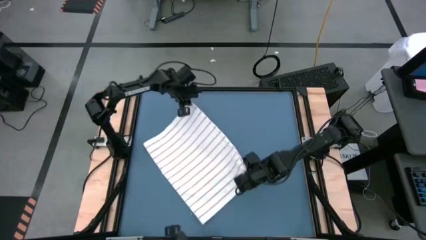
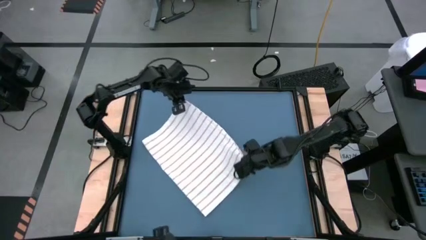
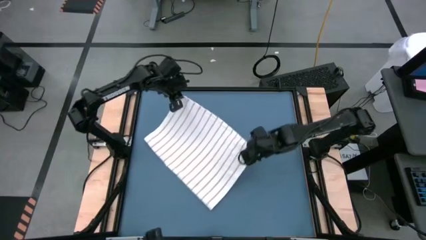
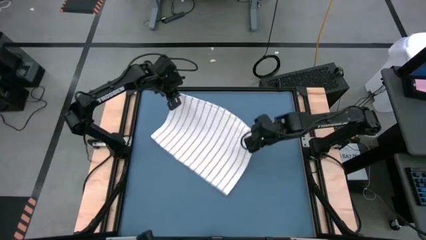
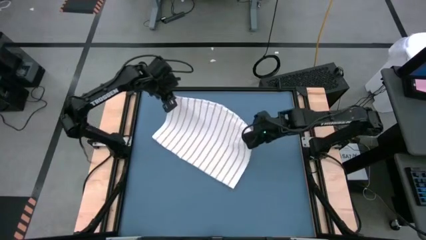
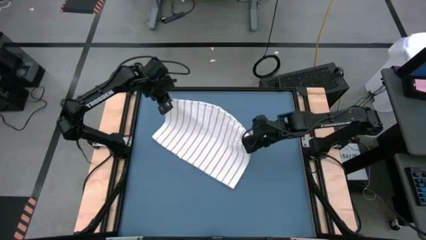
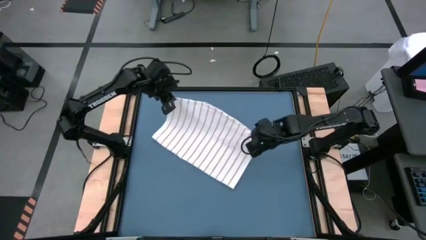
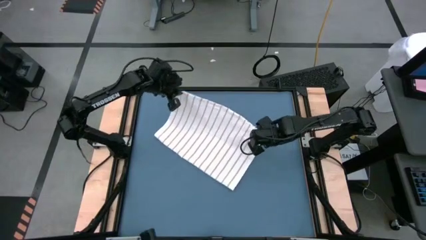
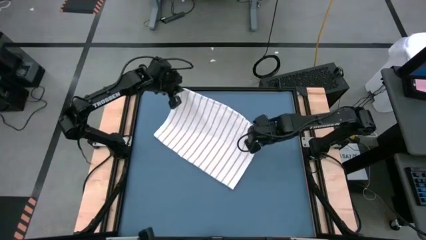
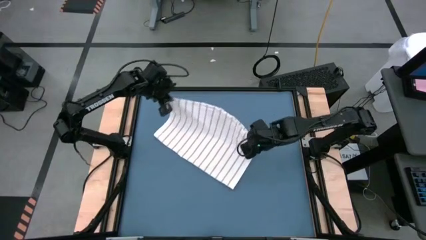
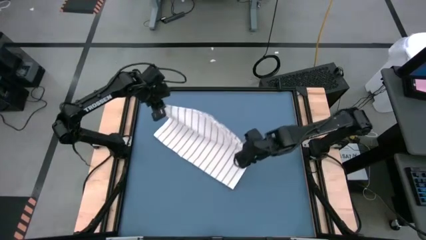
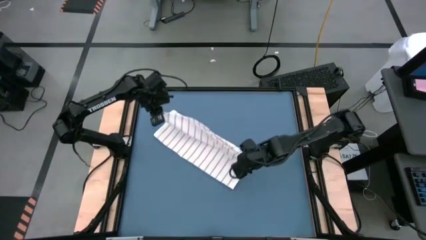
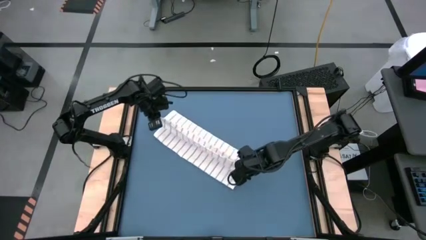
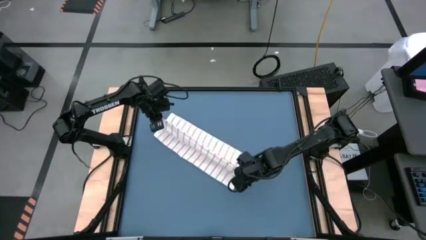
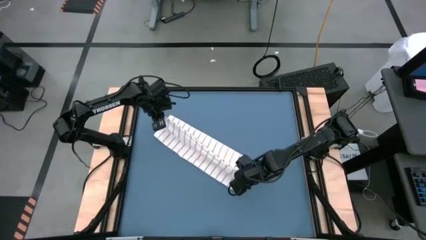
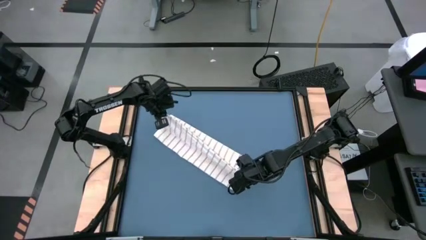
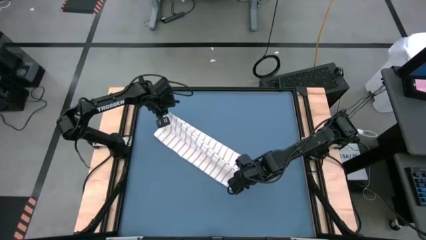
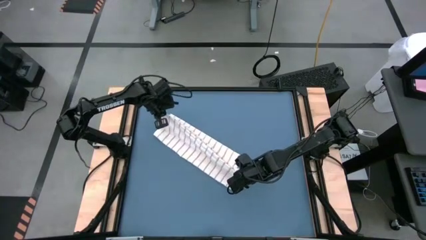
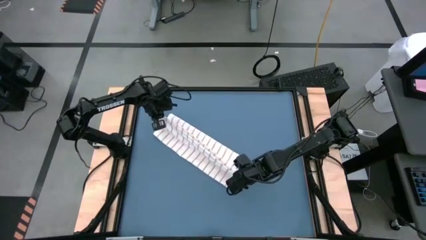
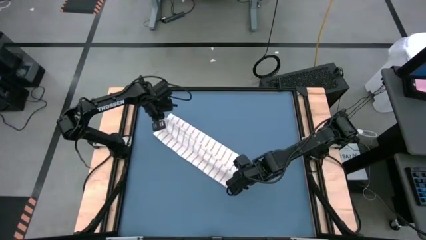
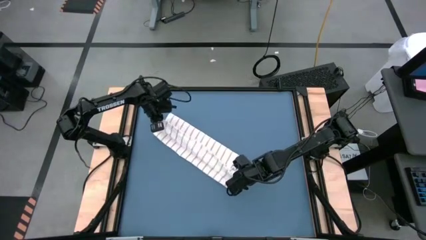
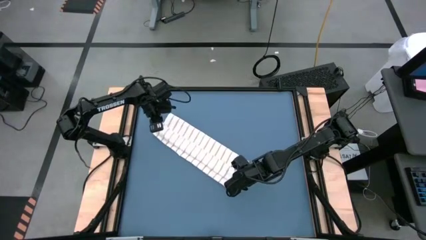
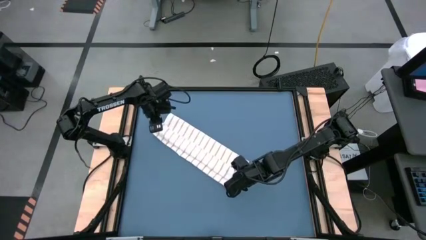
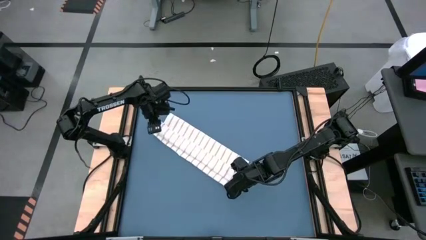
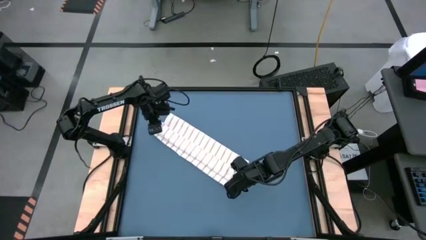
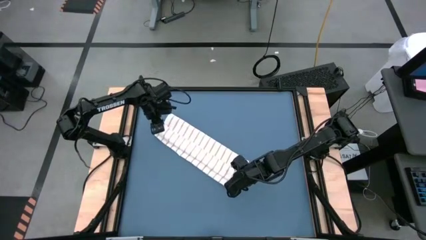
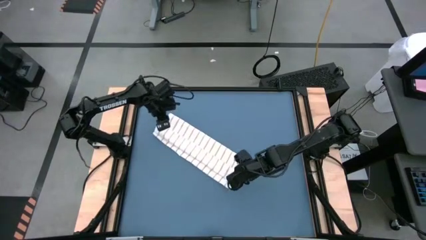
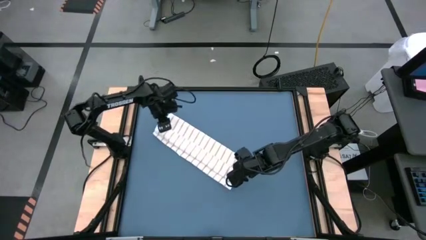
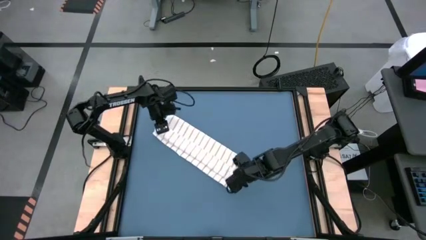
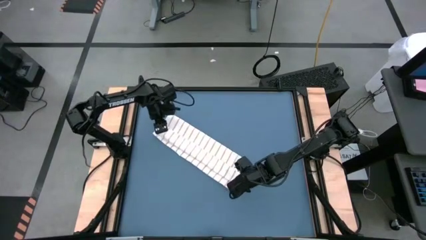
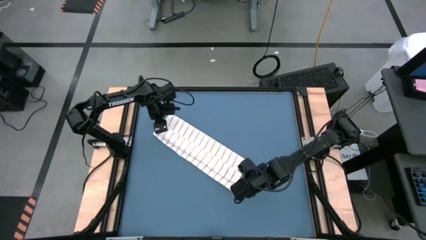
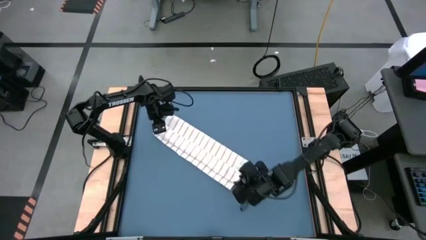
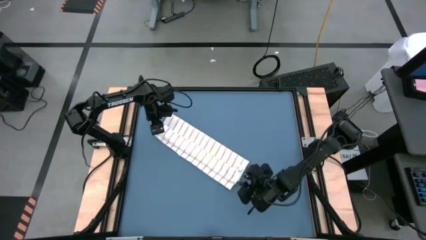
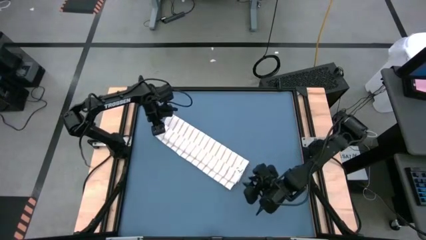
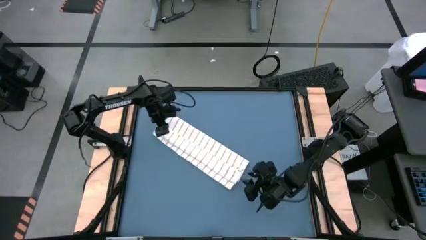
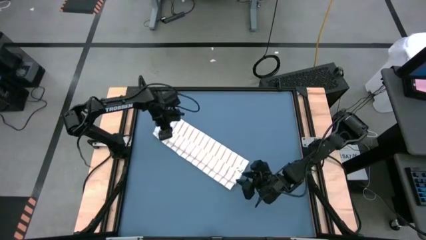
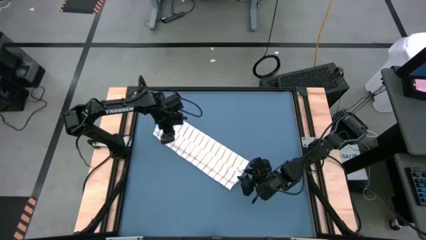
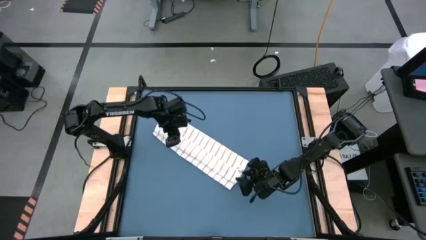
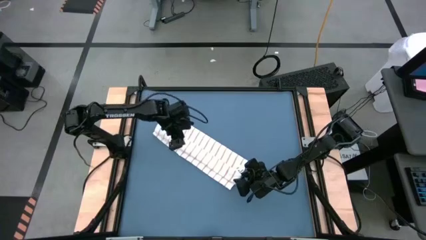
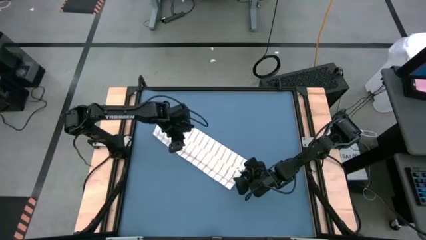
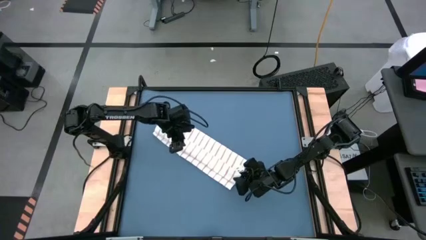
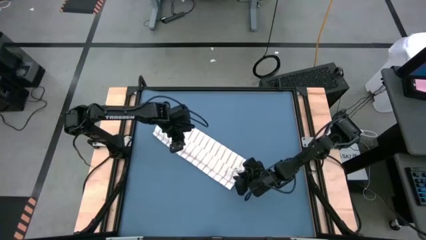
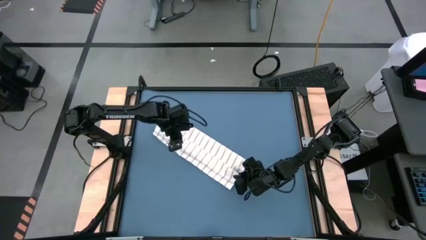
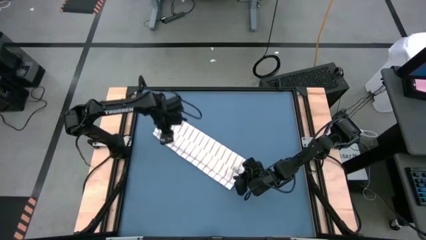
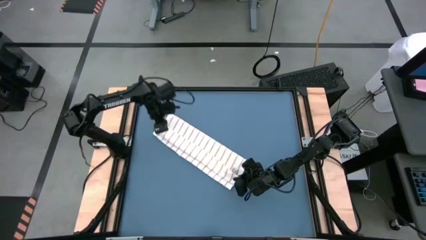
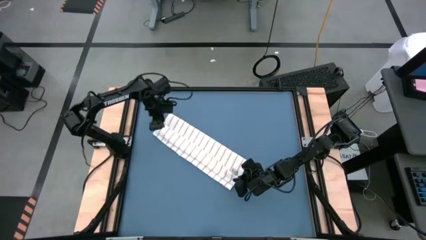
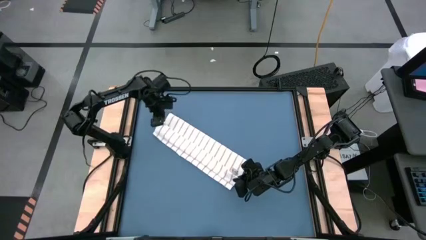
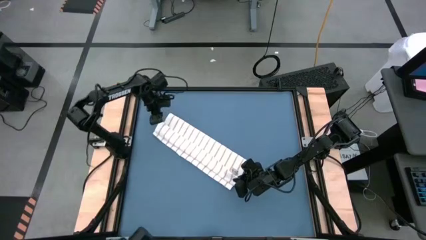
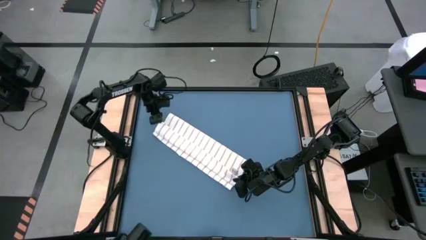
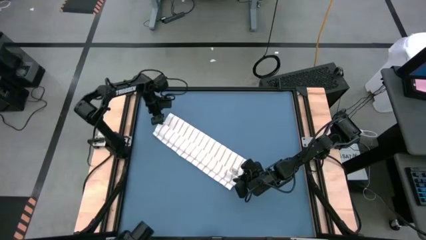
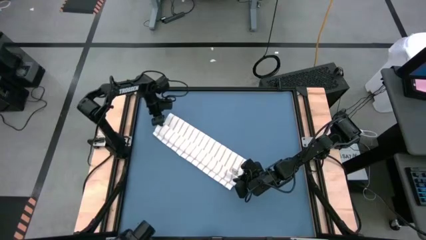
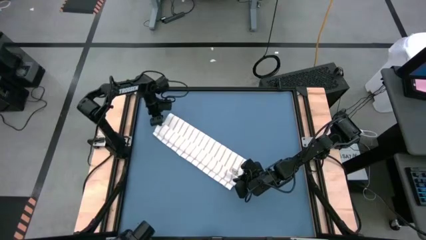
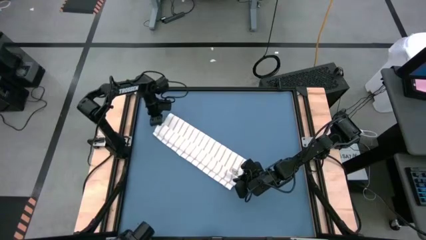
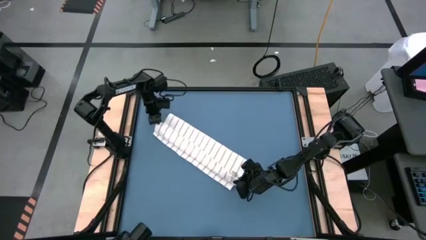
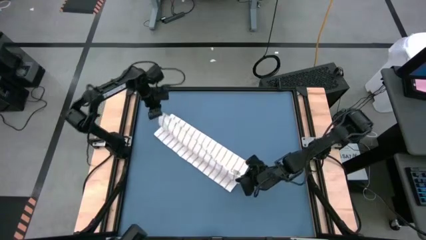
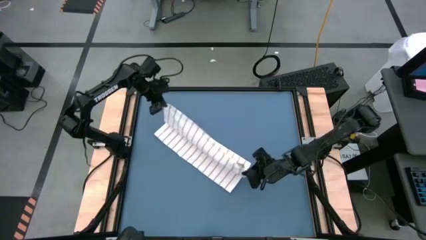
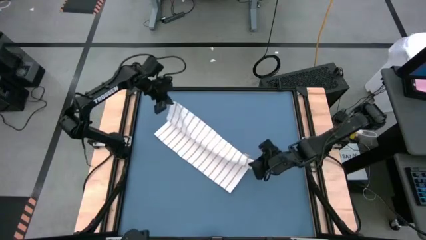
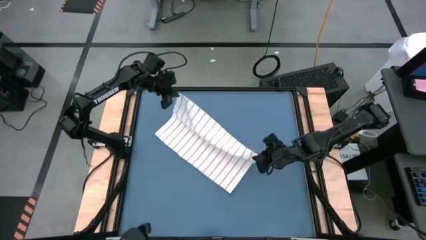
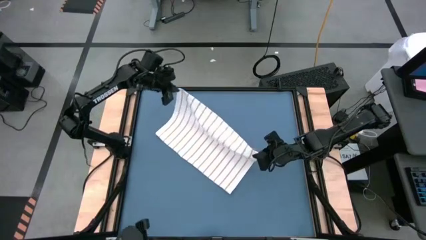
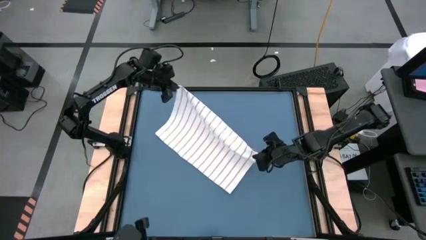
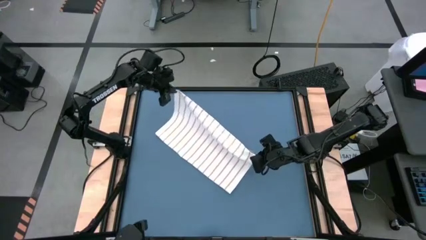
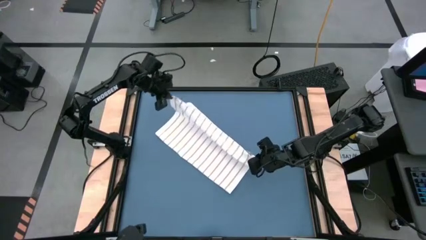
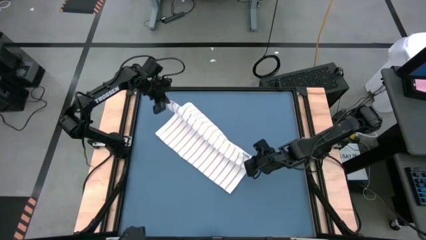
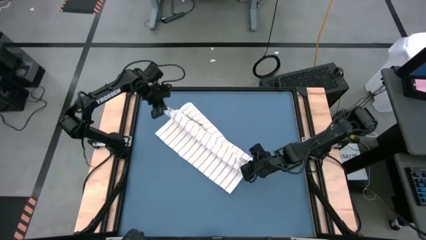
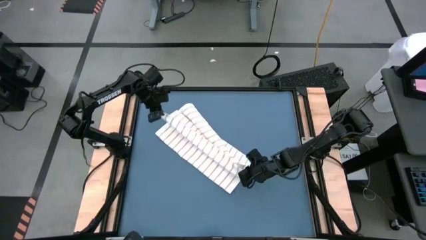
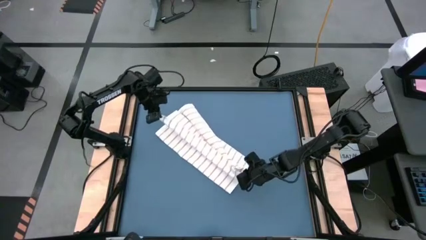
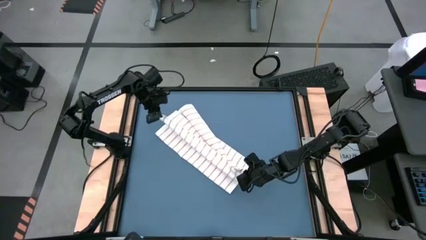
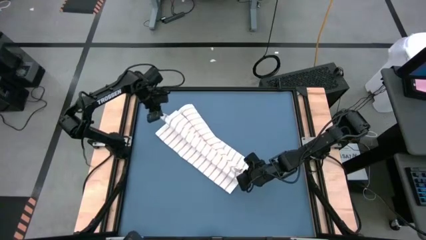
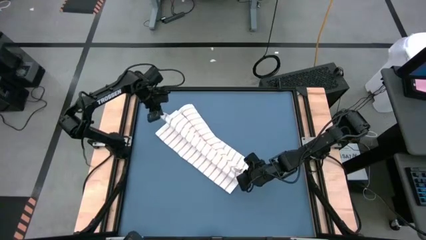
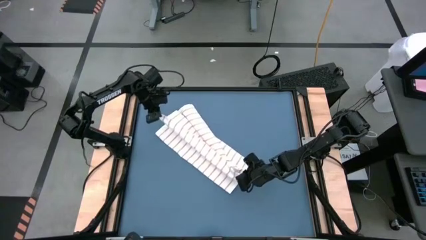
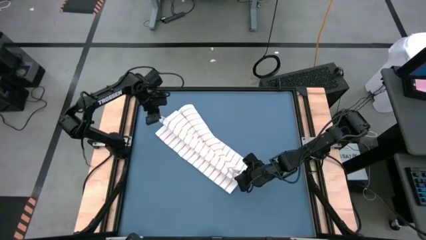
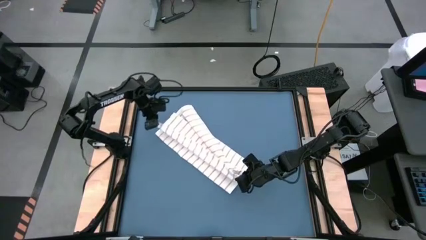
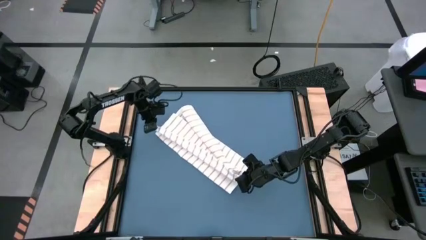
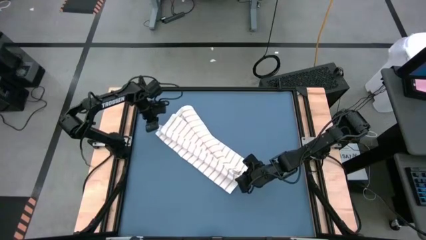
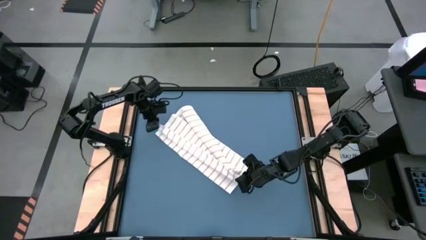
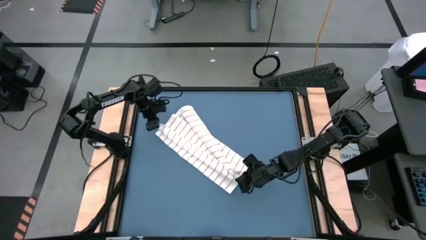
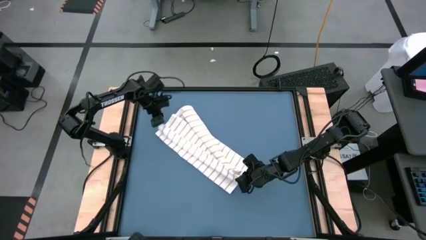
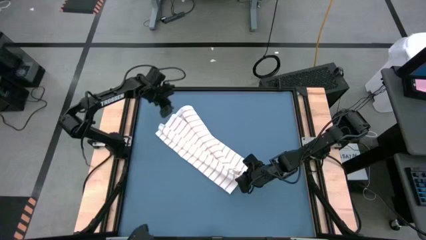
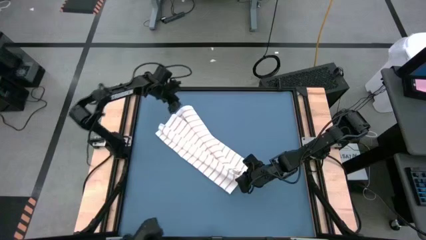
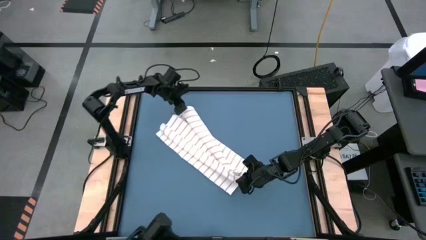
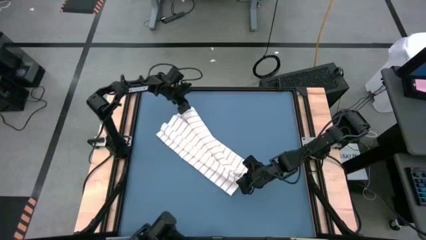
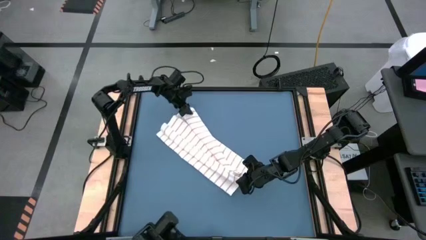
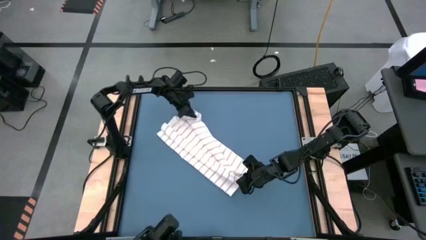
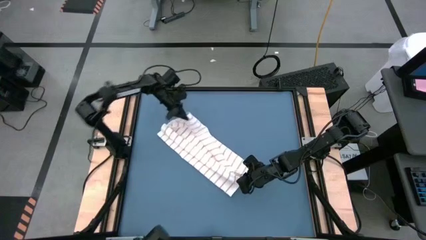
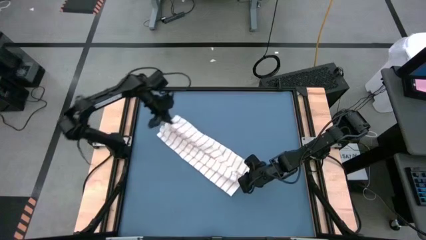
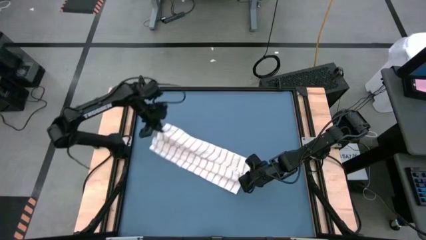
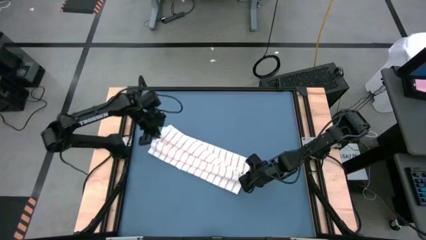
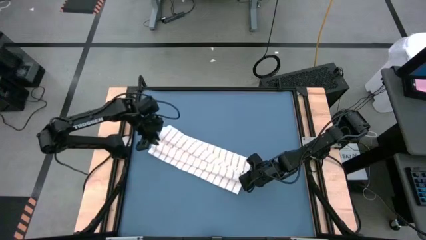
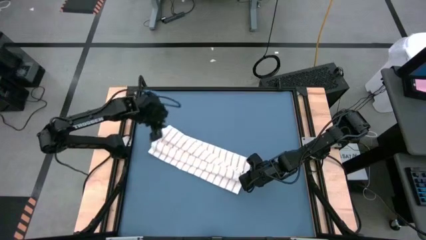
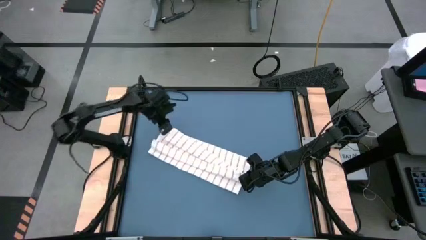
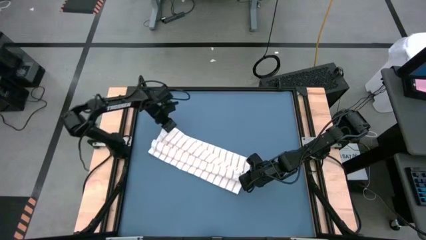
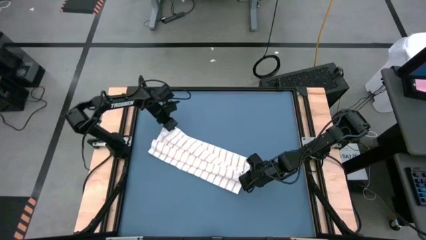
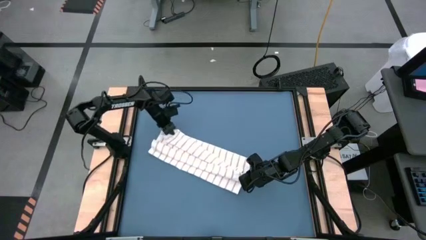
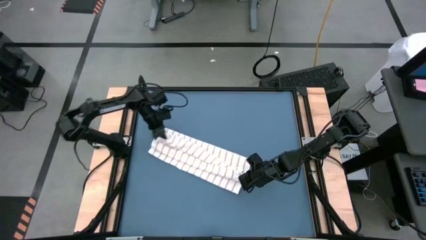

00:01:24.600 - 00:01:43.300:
Task: Roll towel
Fold the white towel
